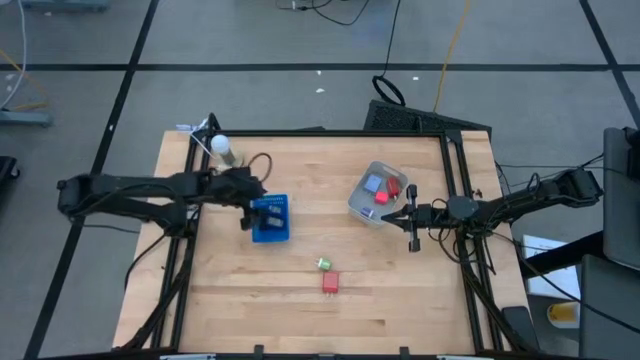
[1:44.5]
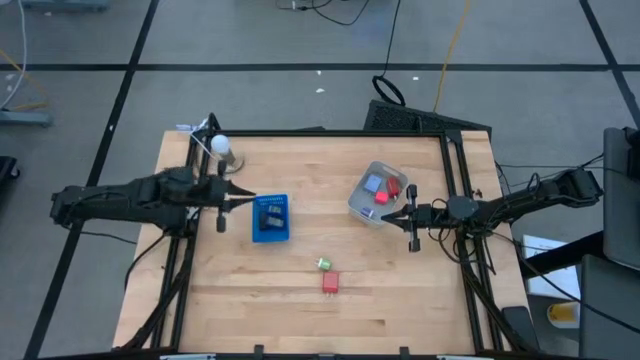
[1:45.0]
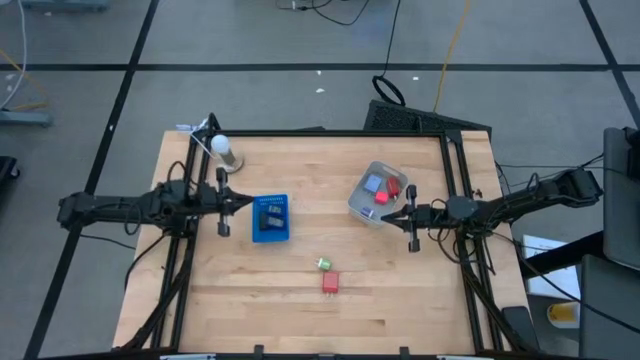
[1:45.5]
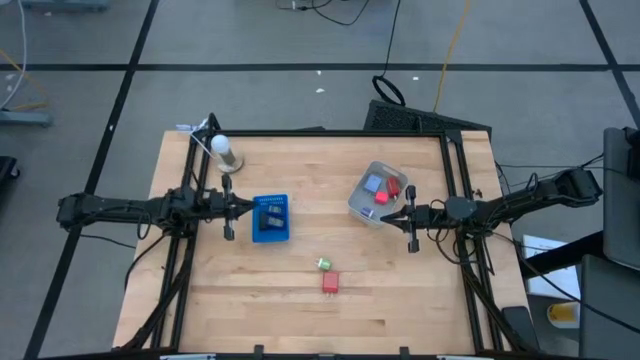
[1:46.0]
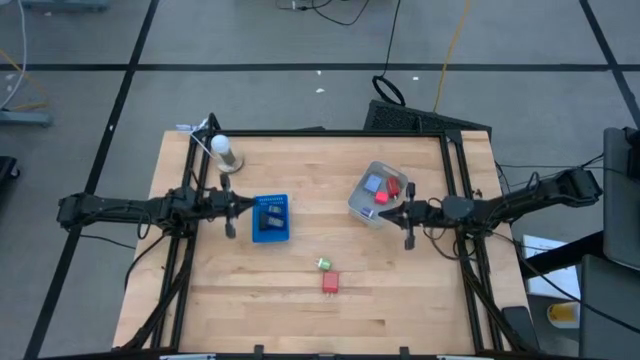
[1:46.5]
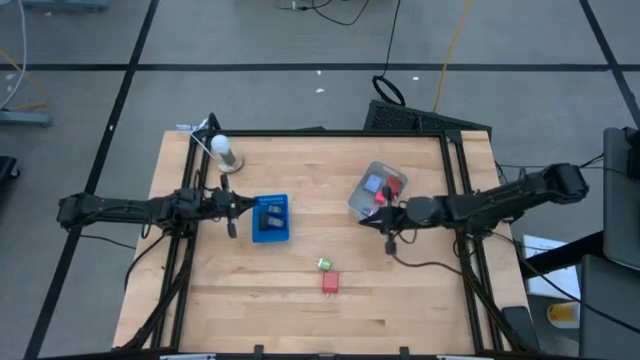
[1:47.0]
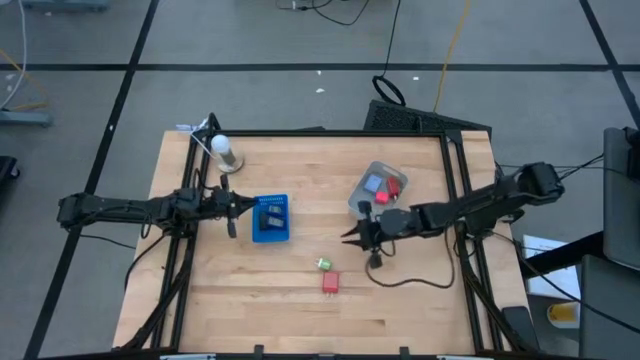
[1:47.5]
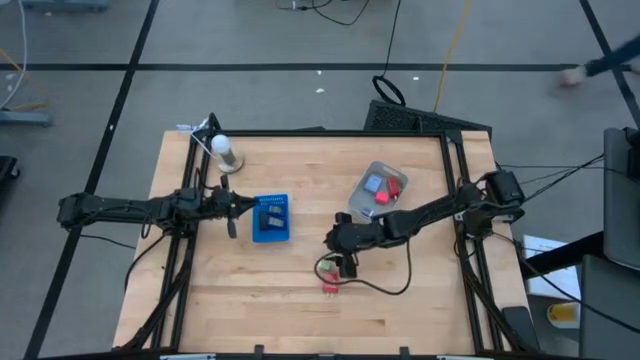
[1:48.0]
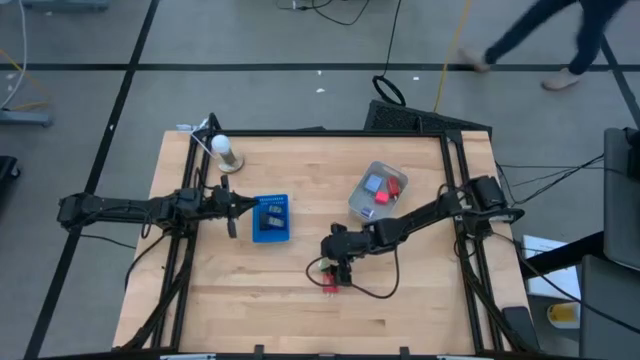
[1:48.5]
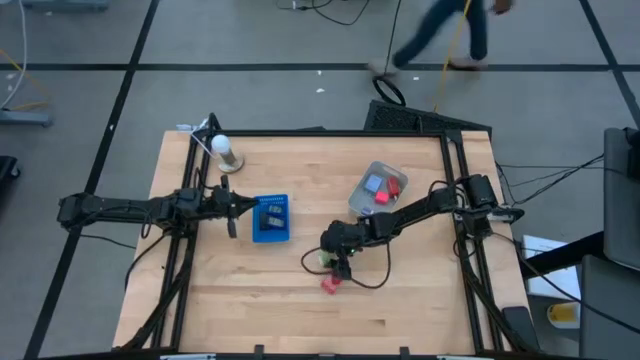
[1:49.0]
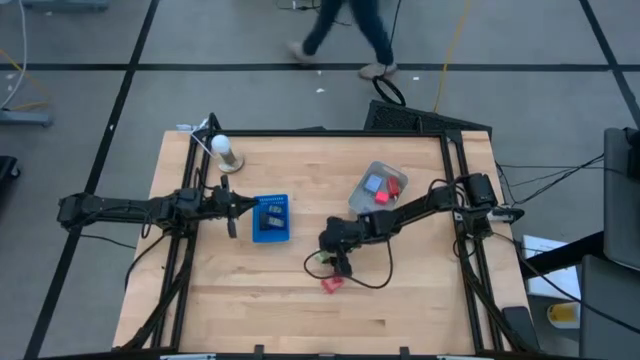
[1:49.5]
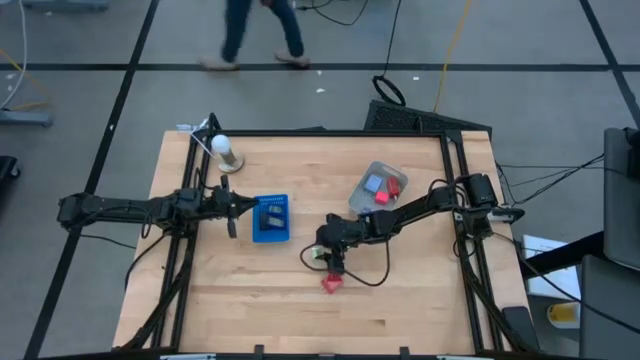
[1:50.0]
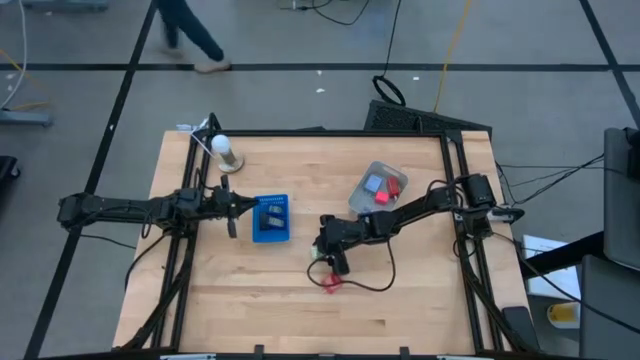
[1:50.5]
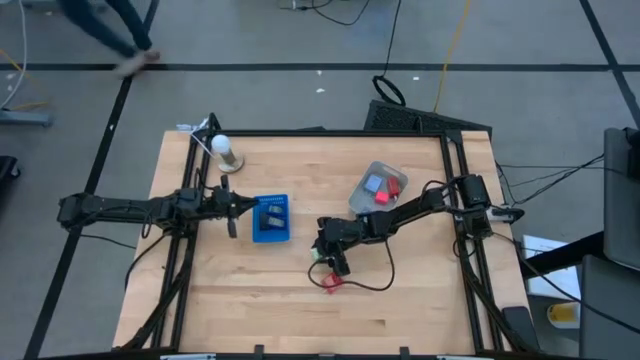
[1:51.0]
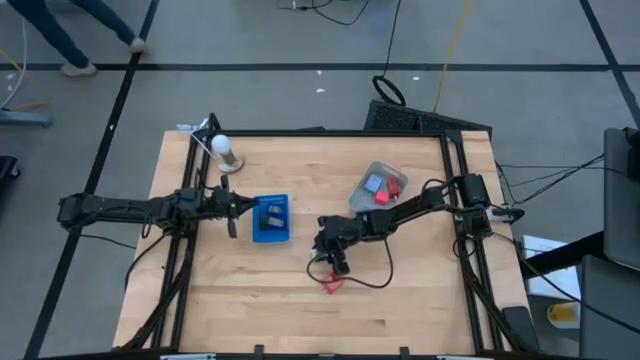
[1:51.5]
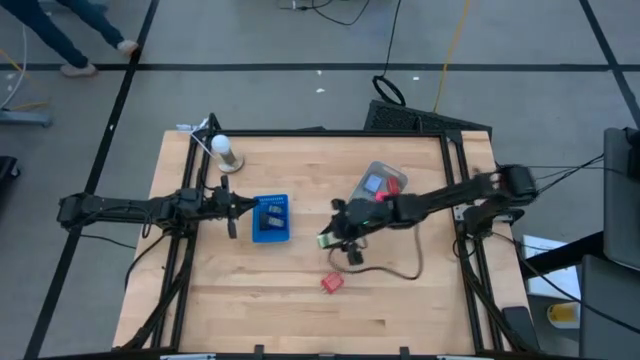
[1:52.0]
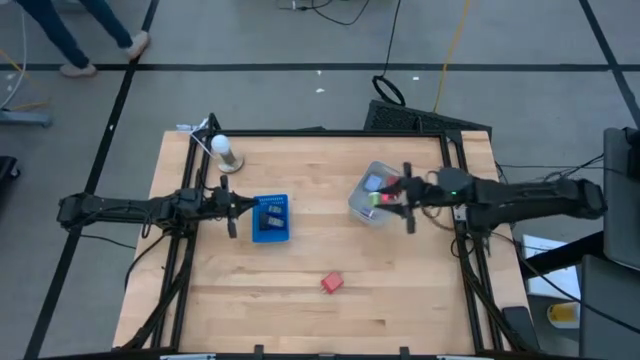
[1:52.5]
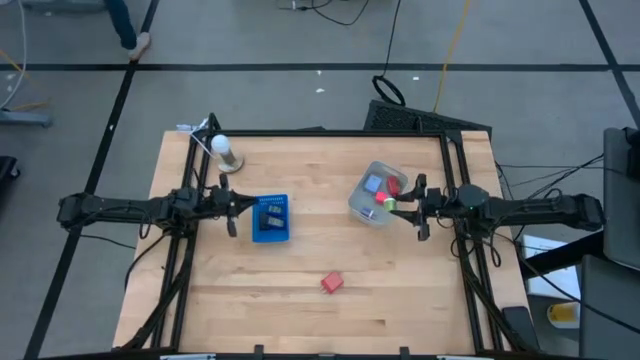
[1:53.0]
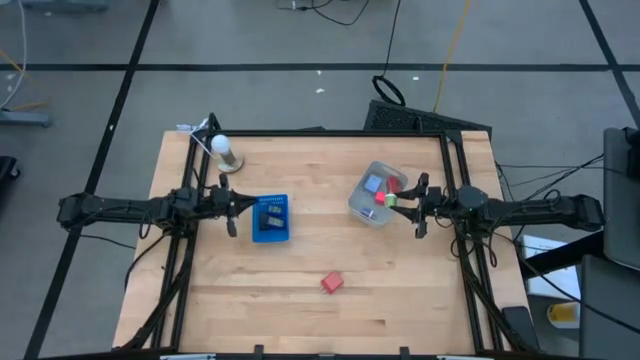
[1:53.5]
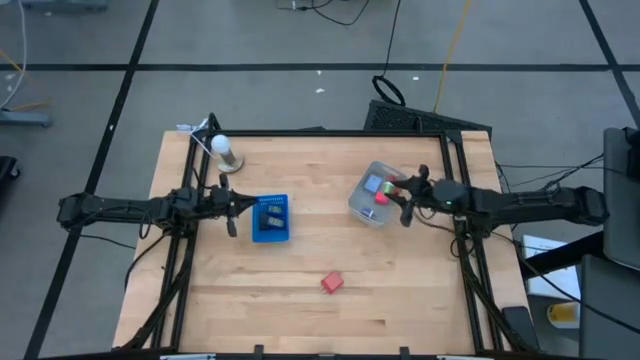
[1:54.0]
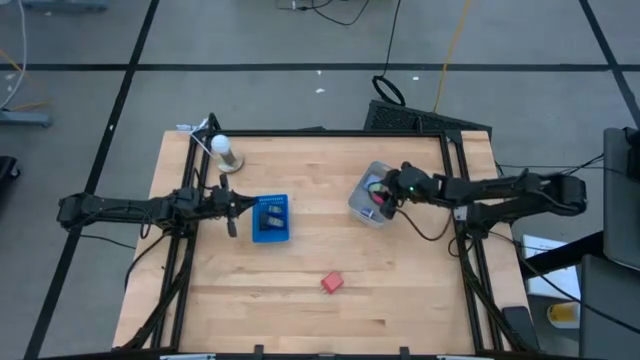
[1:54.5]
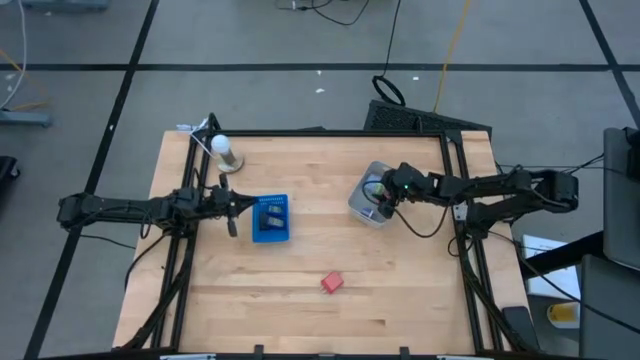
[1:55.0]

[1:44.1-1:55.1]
Task: Pick & Place Office items
Put the green charger adapter into the gray bin

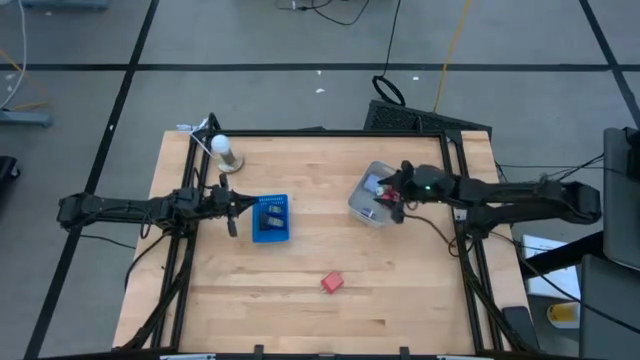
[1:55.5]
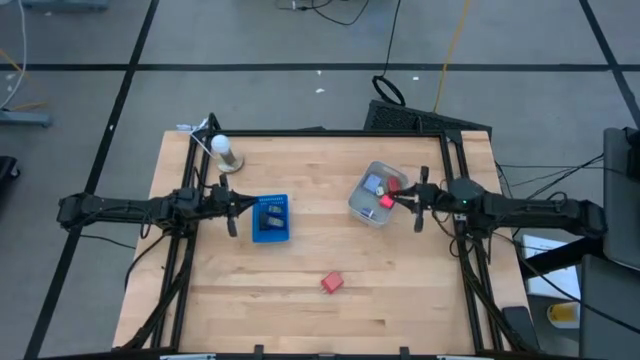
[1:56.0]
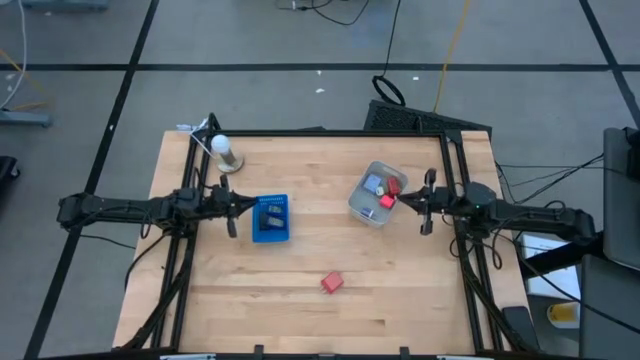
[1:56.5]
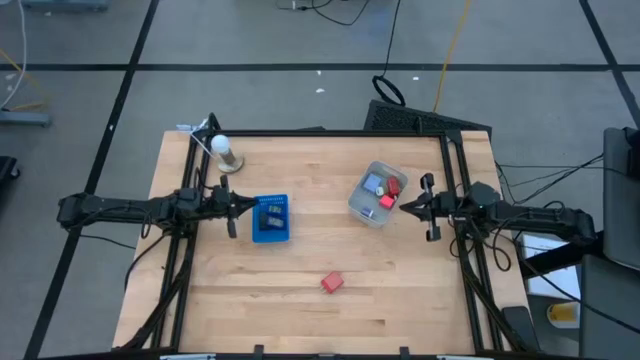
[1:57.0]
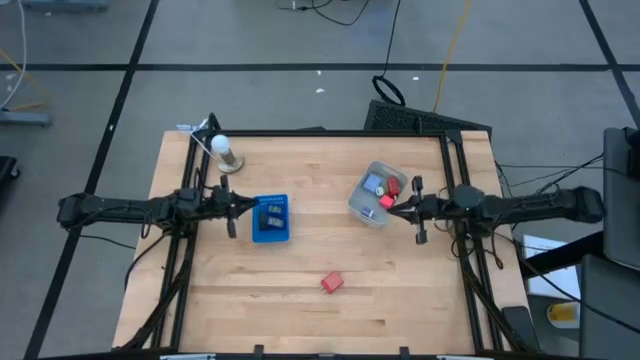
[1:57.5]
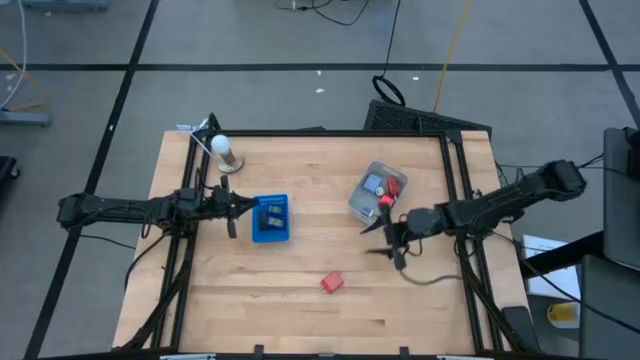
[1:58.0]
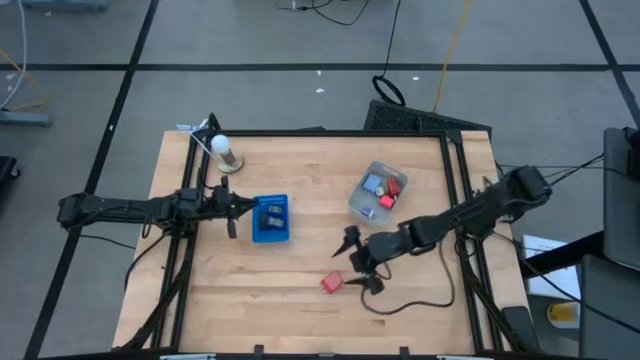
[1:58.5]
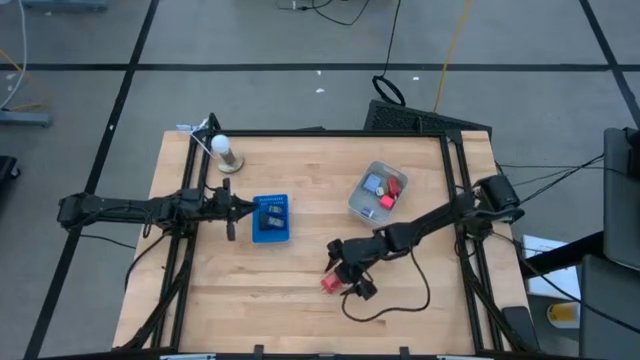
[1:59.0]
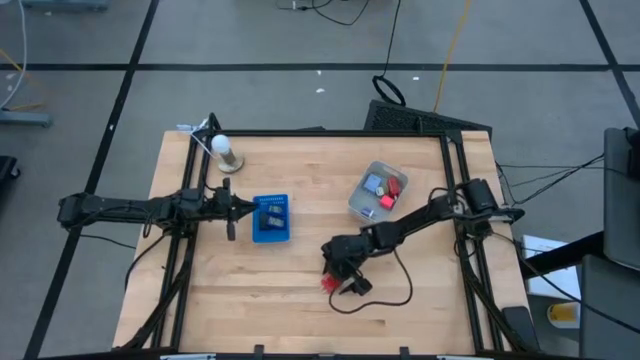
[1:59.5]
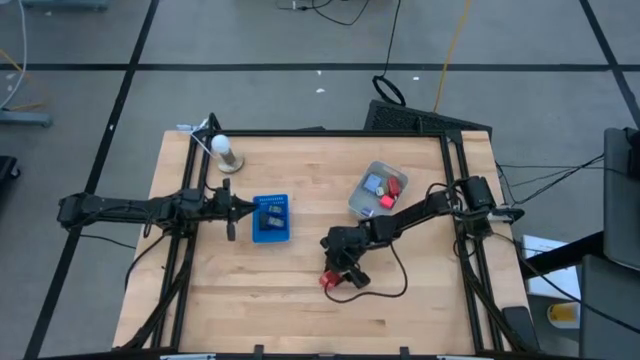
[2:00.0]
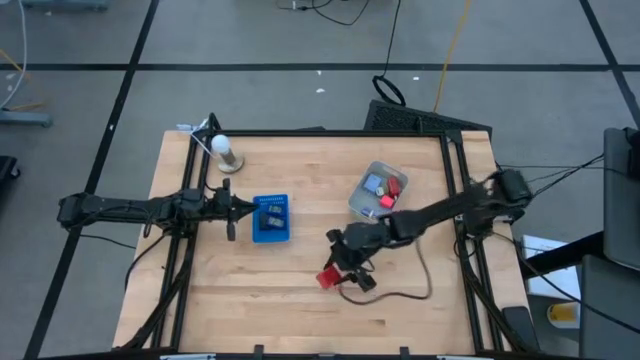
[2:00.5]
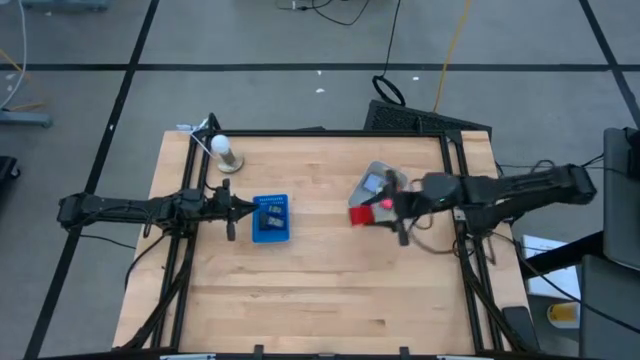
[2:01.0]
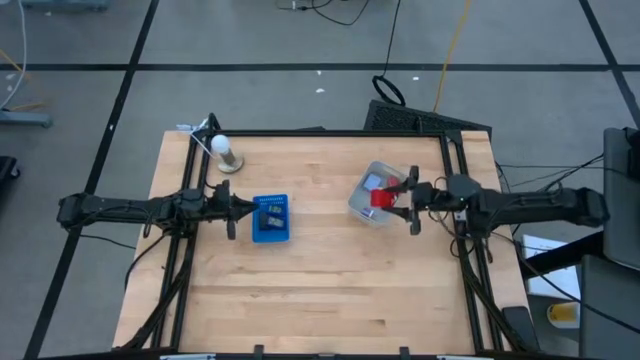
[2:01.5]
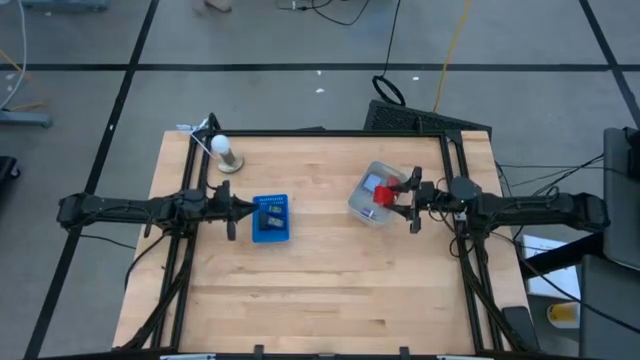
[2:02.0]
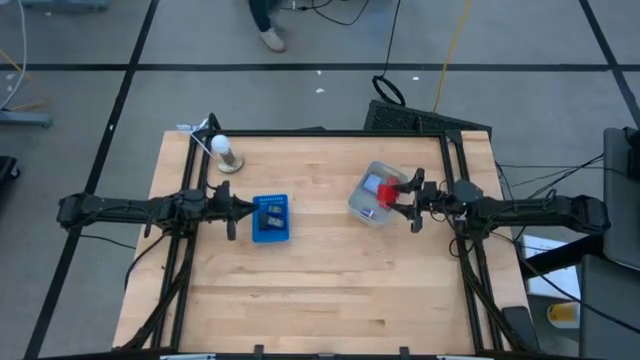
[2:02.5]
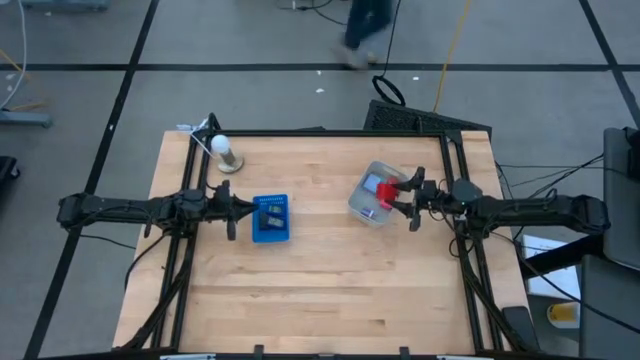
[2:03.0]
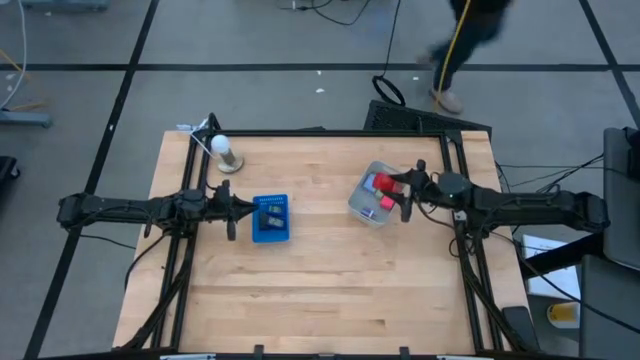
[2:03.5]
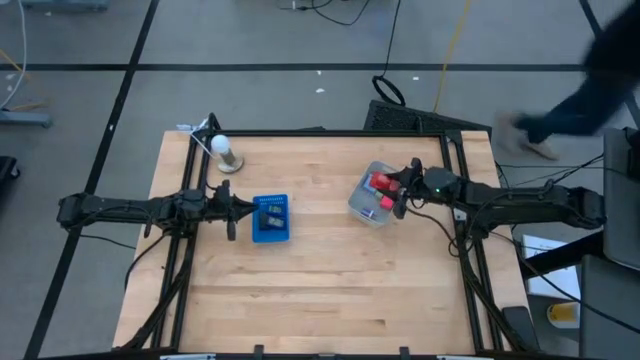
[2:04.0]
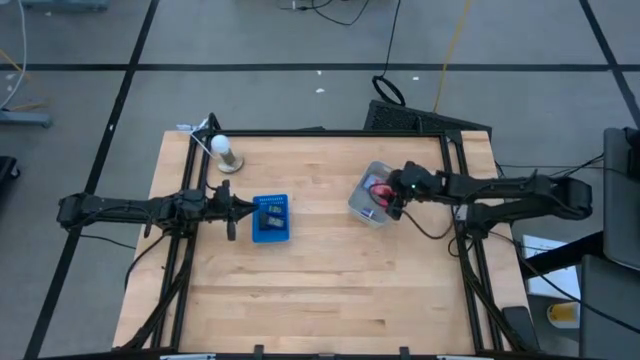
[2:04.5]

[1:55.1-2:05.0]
Put the red charger adapter into the gray bin

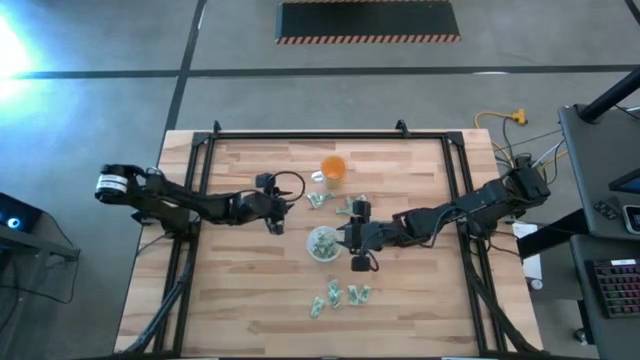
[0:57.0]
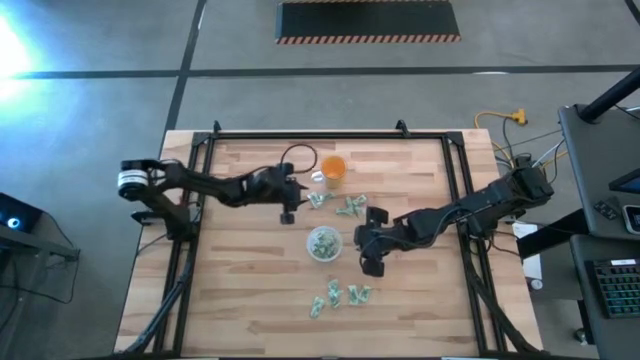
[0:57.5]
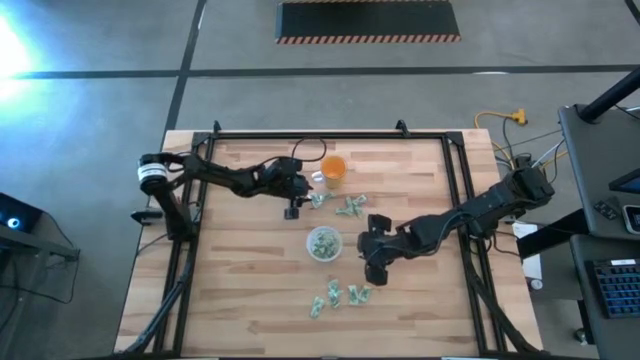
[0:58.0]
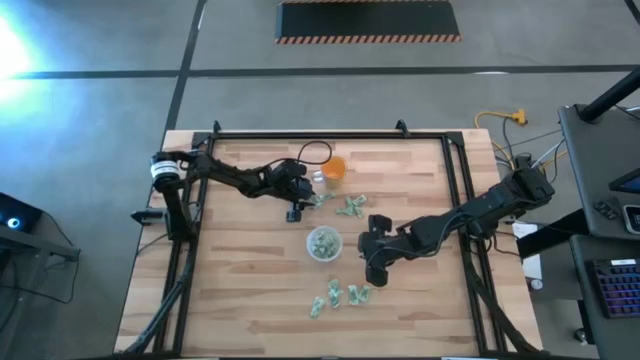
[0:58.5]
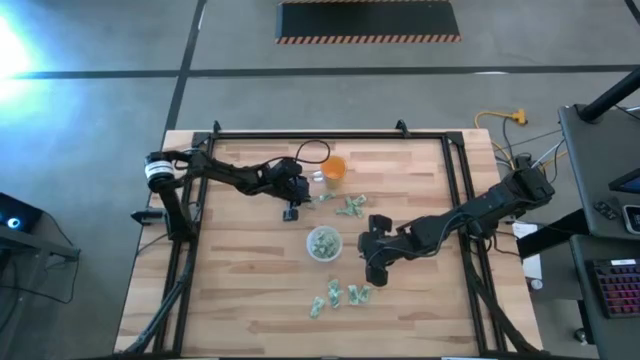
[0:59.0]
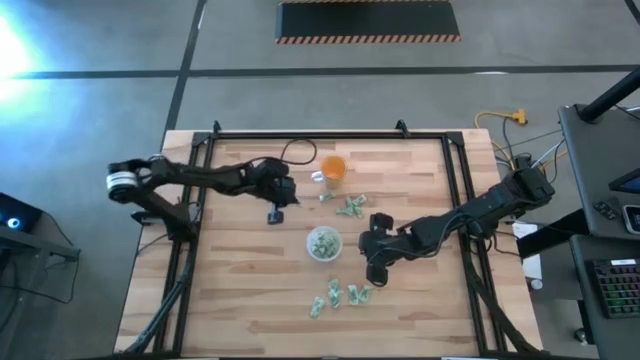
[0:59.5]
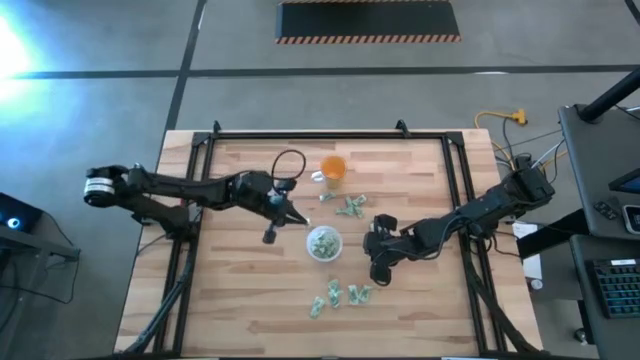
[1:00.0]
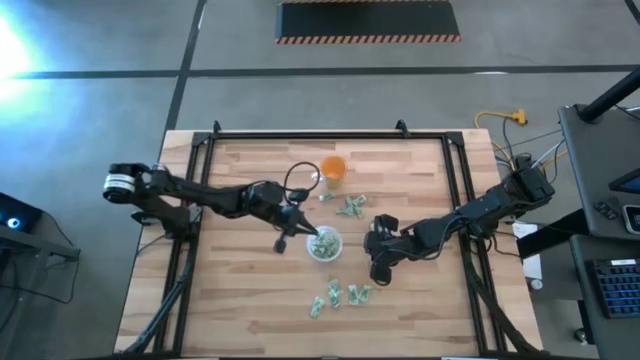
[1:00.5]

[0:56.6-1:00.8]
Task: Pick and place Stevia / Truvia into bins
Put the green stevia packet into the transparent container
